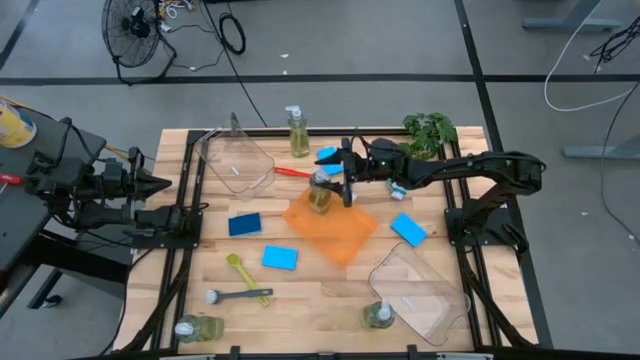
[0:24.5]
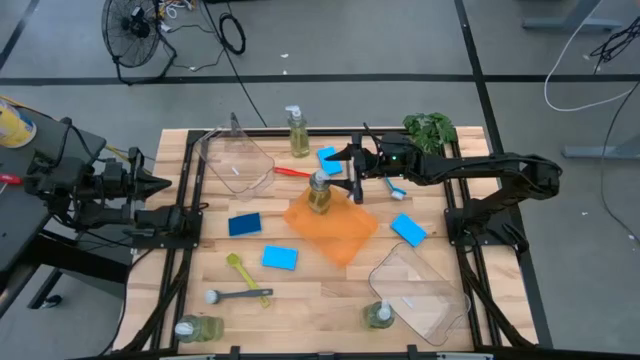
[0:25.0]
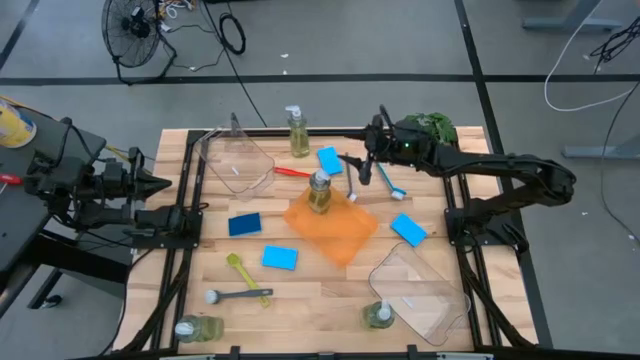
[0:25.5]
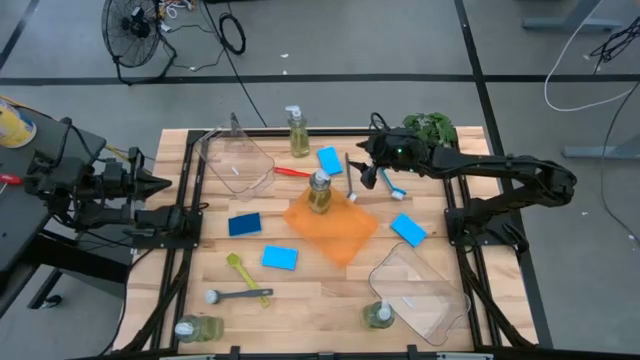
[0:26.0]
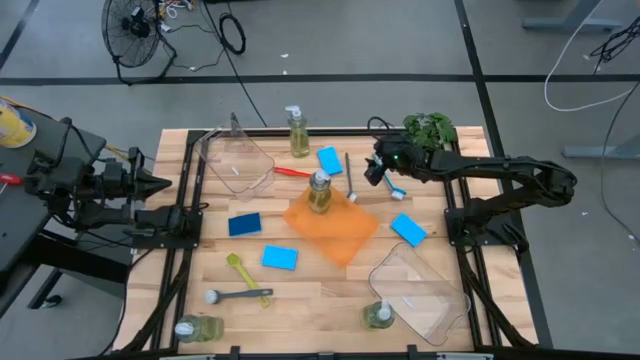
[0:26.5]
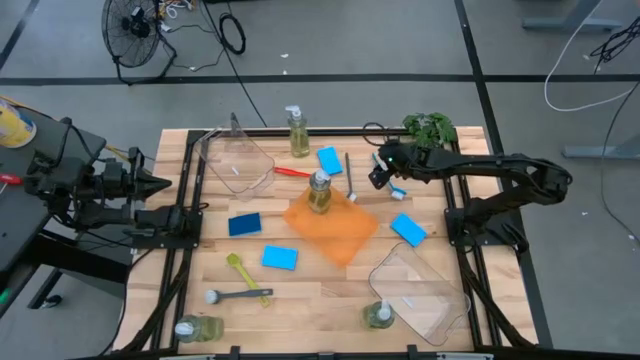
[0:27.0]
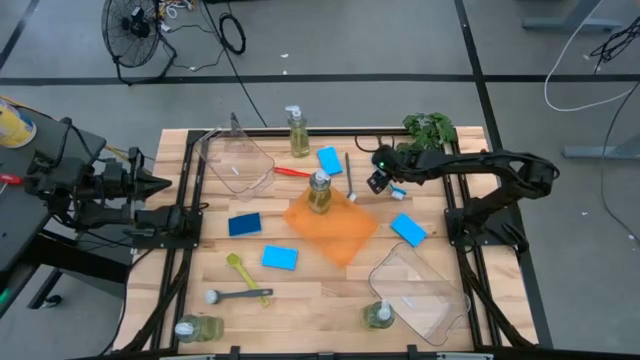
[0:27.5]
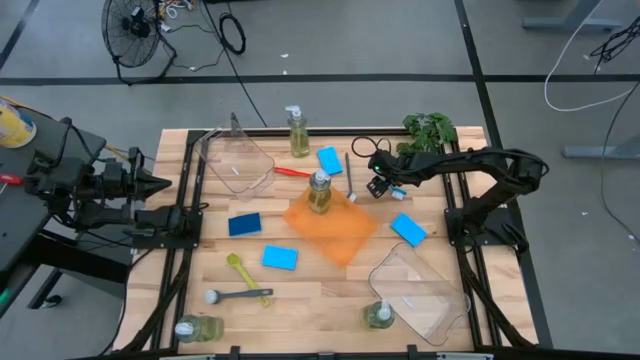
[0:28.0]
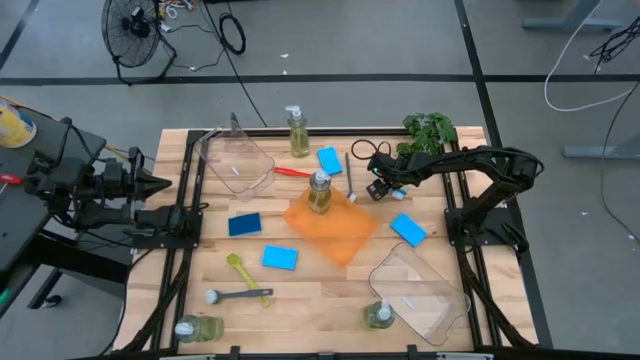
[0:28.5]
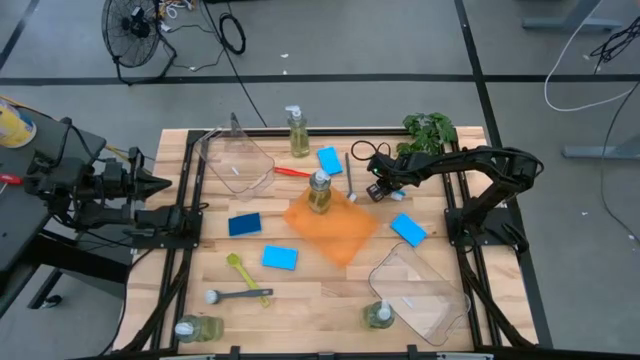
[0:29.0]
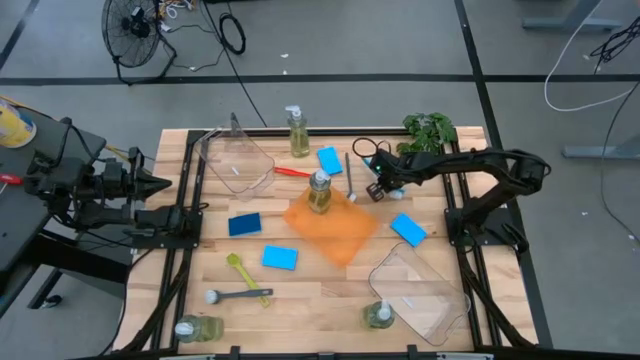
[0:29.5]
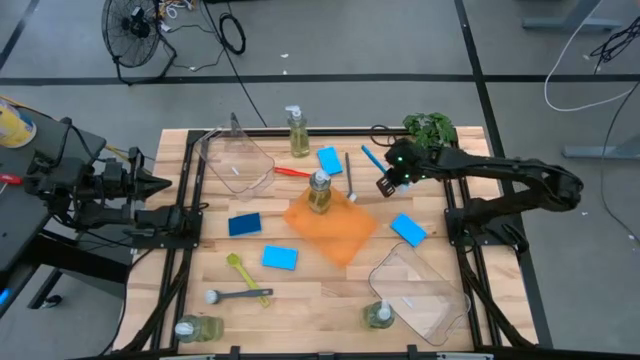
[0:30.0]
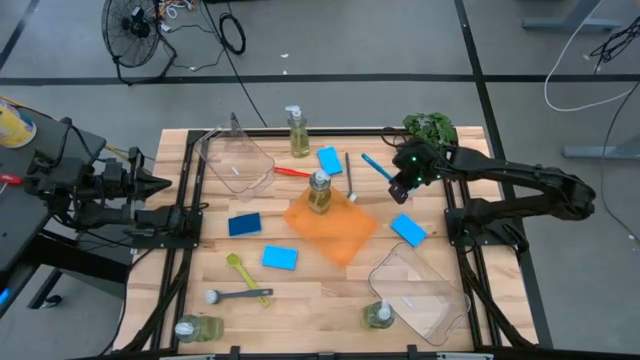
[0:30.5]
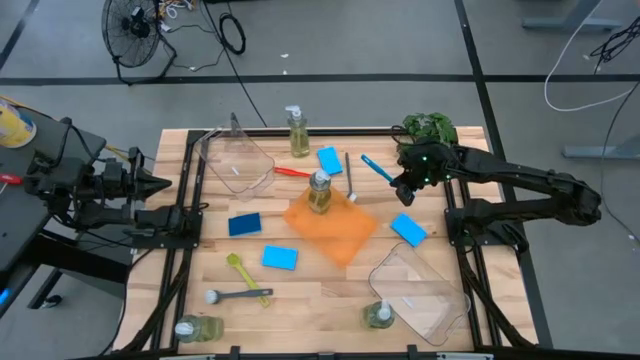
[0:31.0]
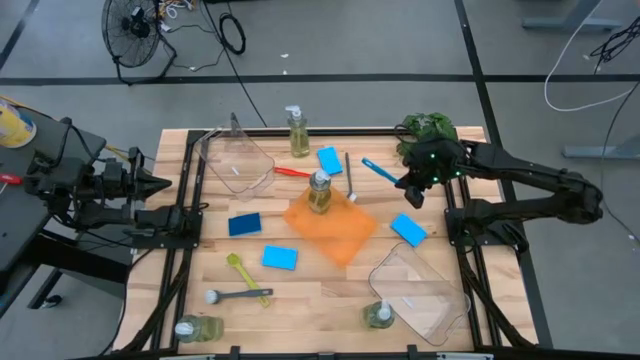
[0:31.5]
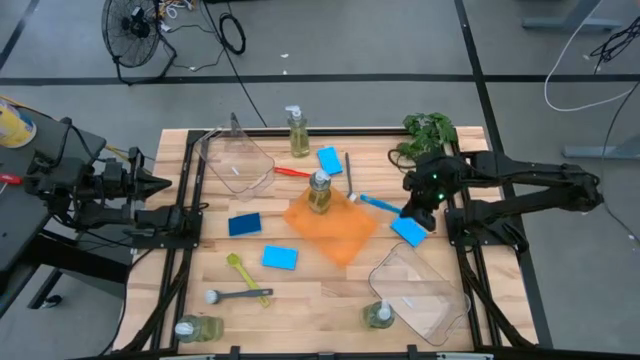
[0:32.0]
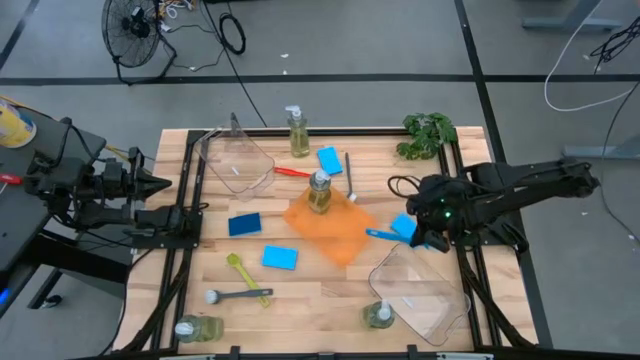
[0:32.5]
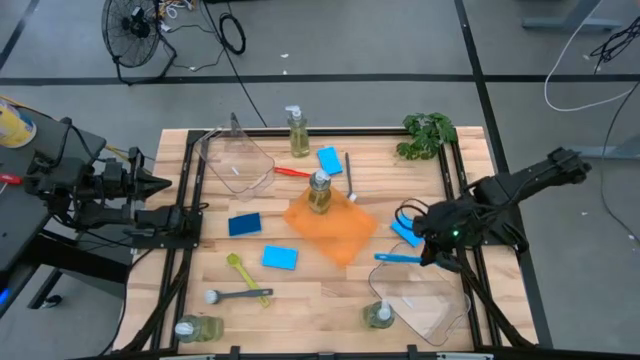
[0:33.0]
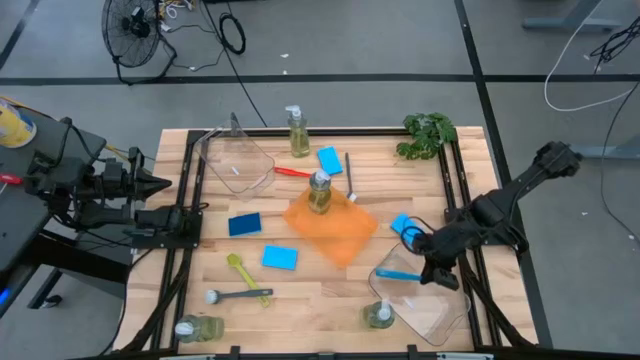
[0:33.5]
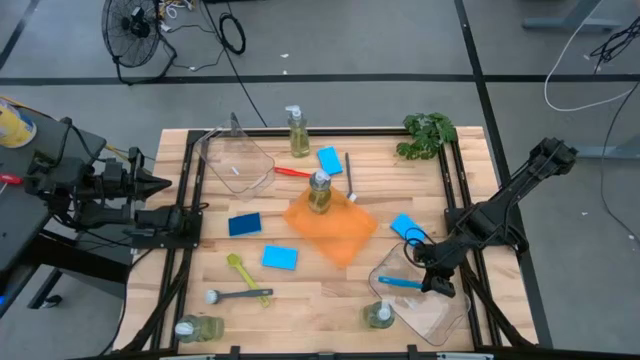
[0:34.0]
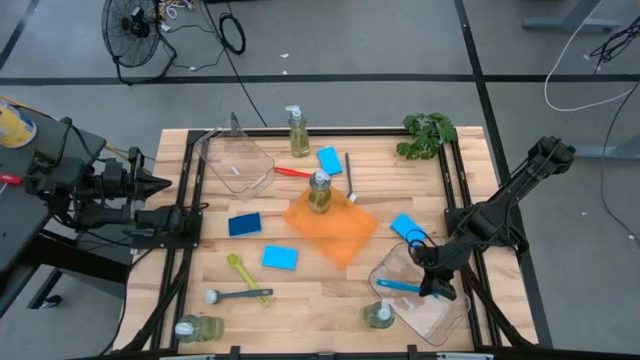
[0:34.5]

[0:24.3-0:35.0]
Task: Pick & Place Kitchen Sink Supplies
Put the blue dish brush into the bottom transparent bin

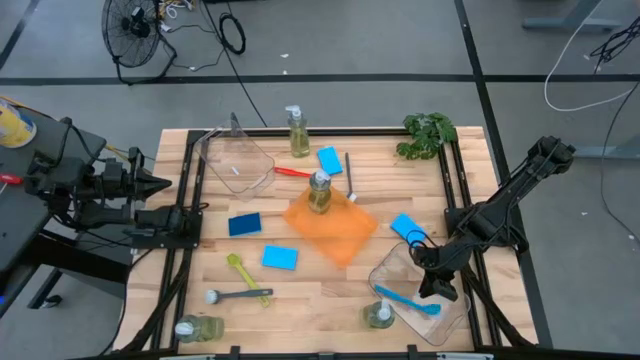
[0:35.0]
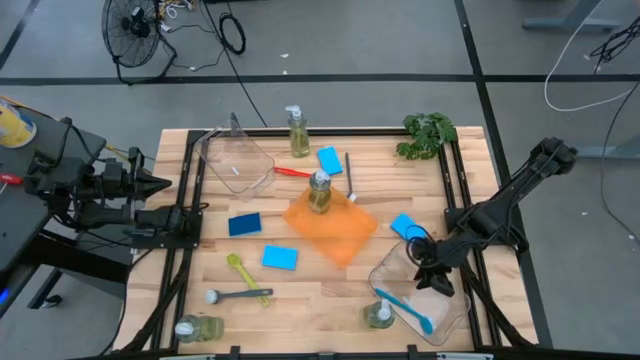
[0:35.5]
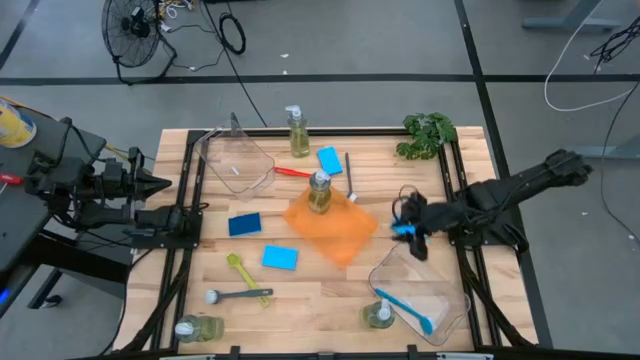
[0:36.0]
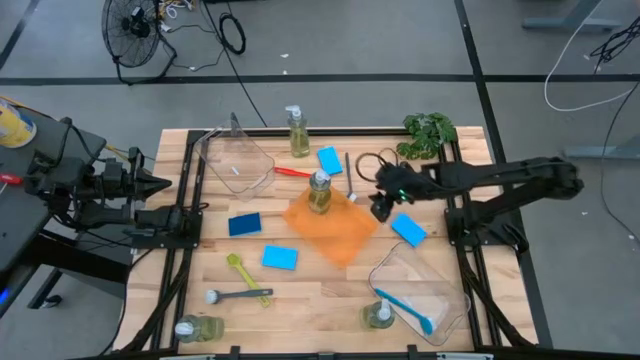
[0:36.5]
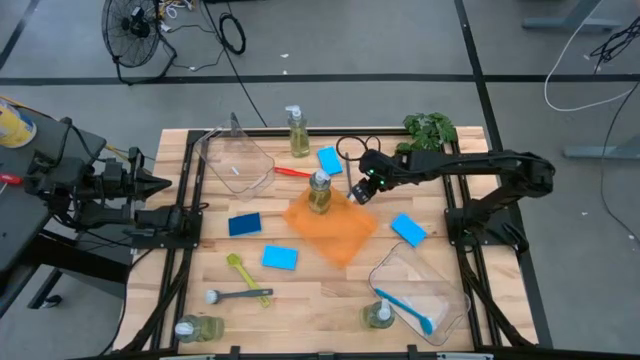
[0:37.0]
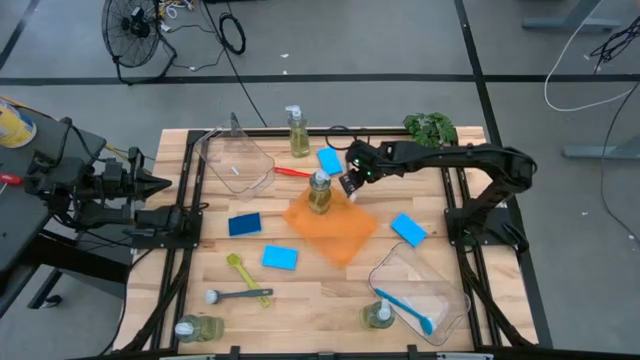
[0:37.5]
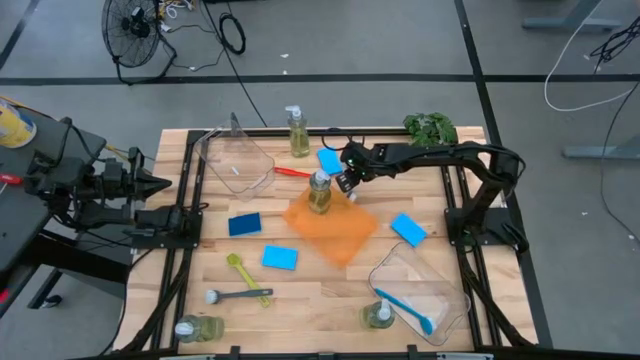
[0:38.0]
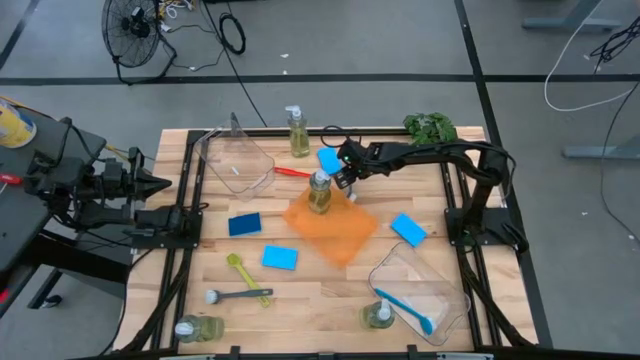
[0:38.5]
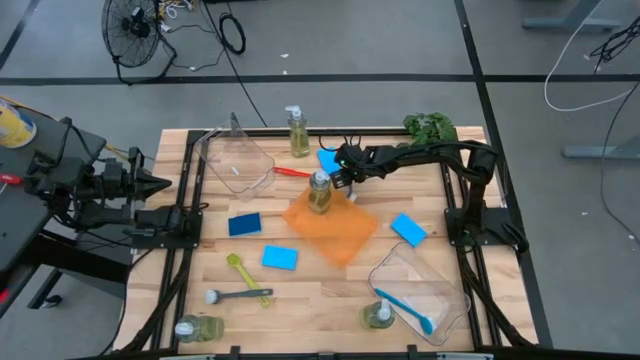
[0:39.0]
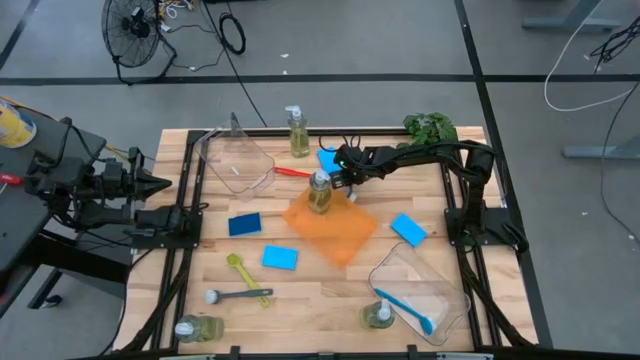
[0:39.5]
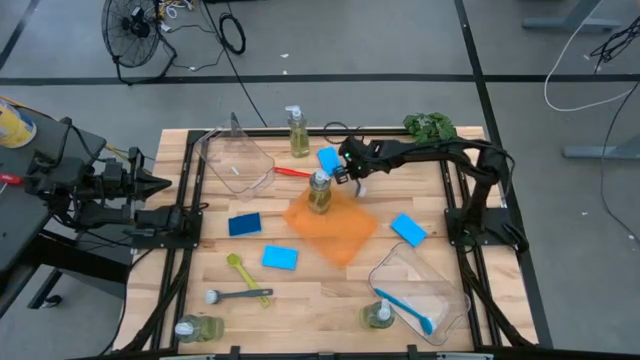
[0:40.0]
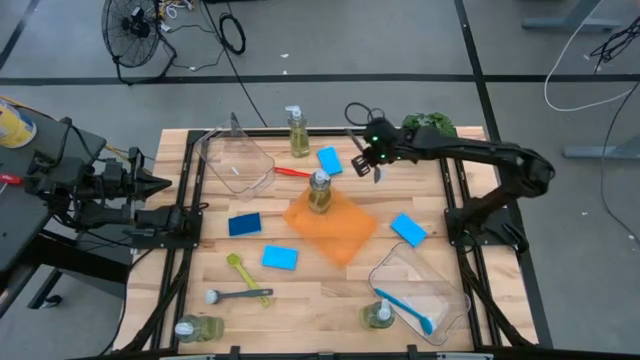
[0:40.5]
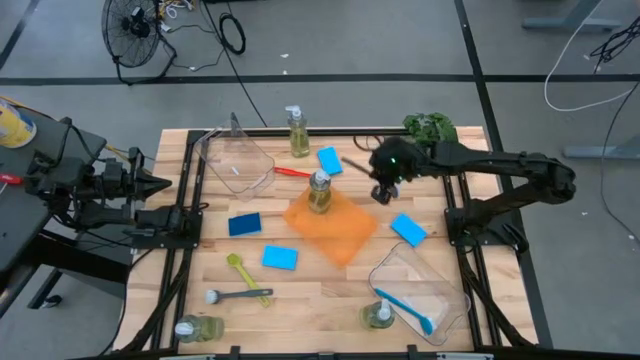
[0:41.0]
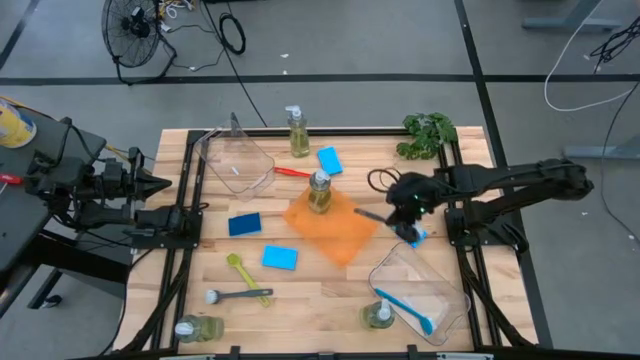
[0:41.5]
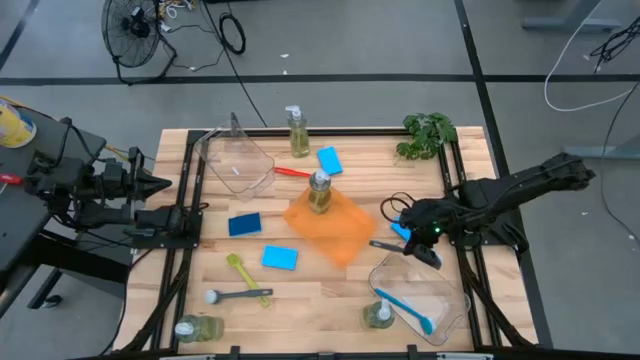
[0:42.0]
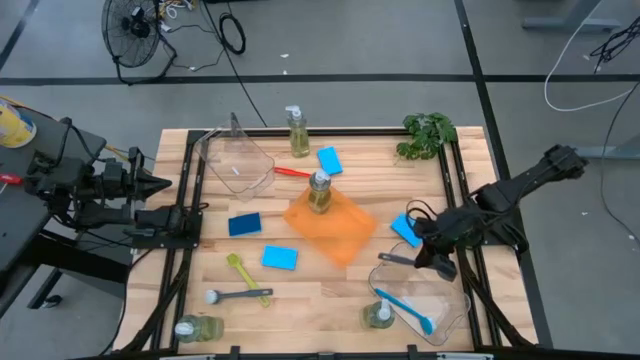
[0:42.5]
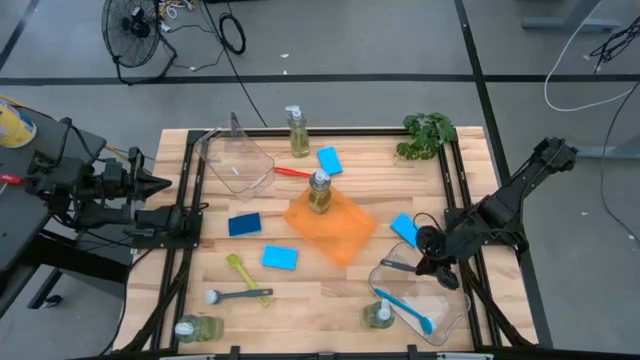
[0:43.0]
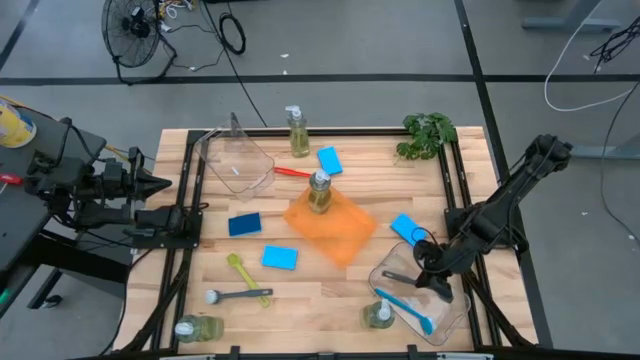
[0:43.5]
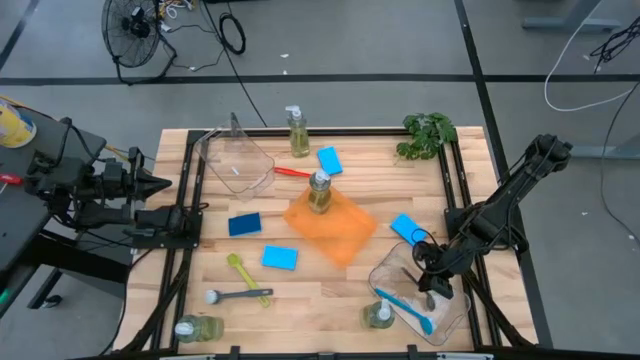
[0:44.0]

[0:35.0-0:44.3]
Put the gray dish brush into the bottom transparent bin
